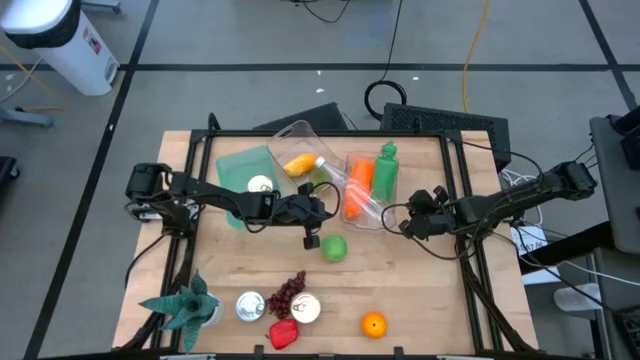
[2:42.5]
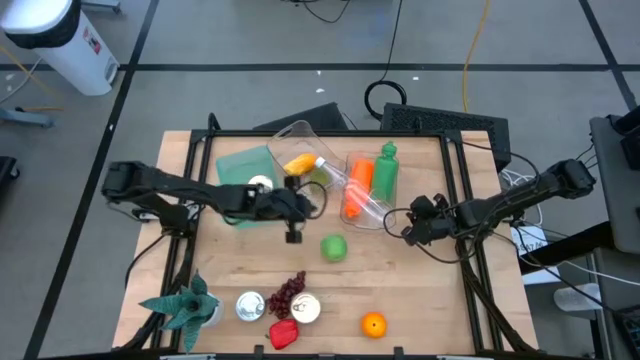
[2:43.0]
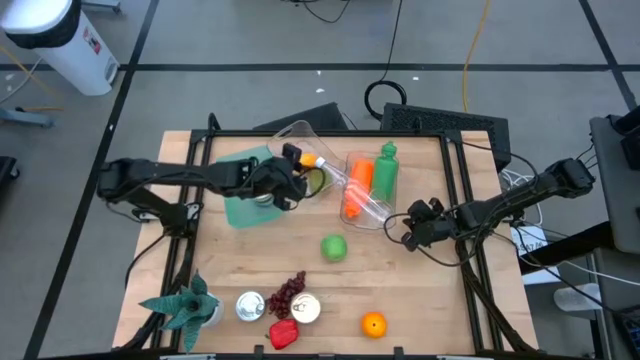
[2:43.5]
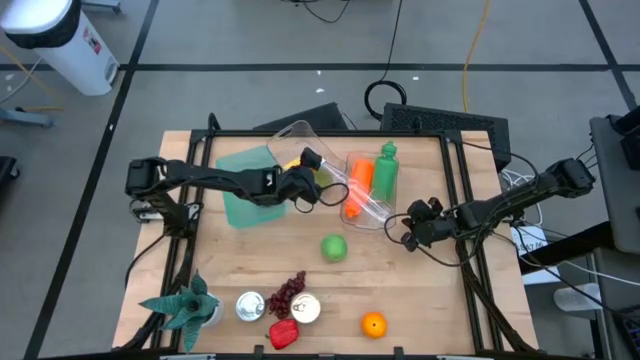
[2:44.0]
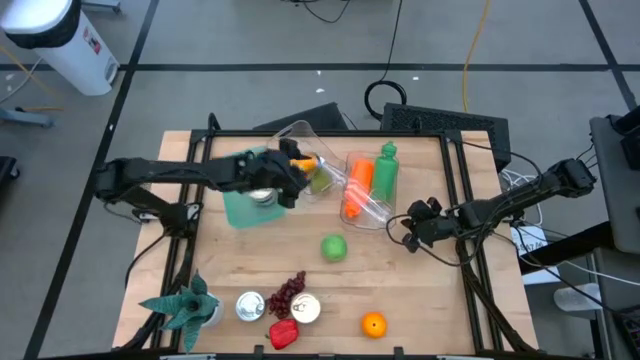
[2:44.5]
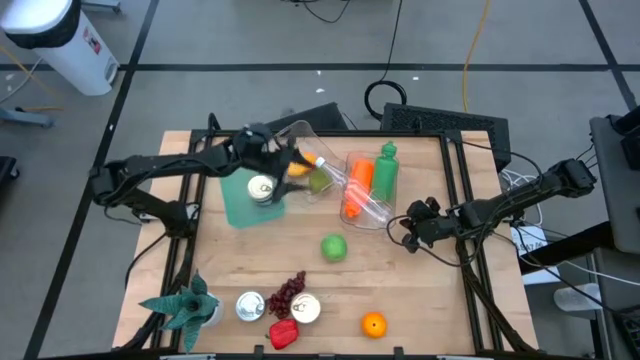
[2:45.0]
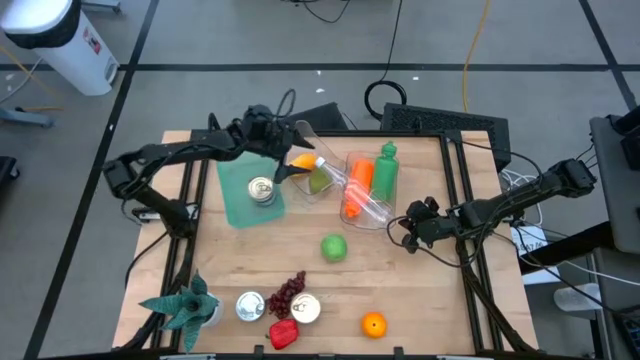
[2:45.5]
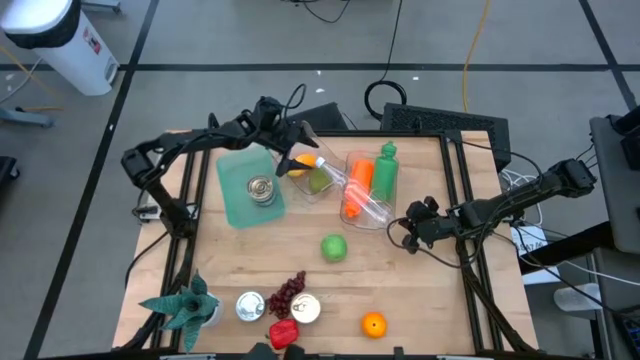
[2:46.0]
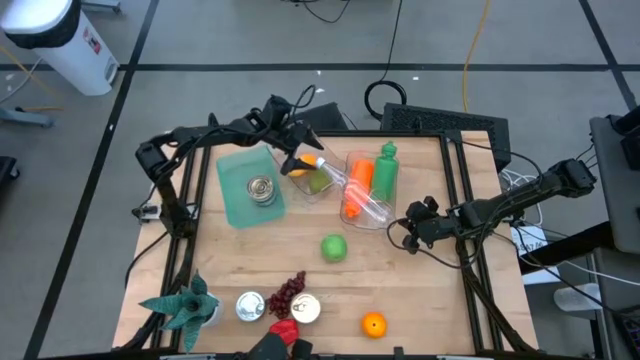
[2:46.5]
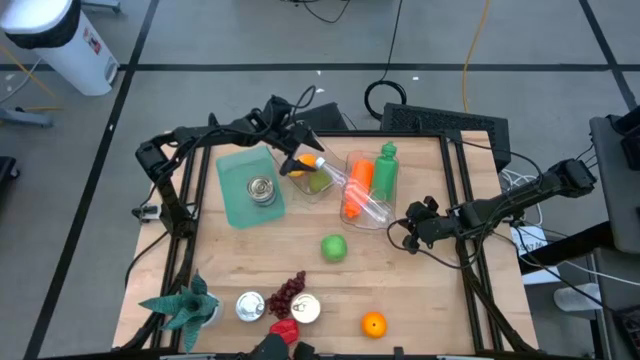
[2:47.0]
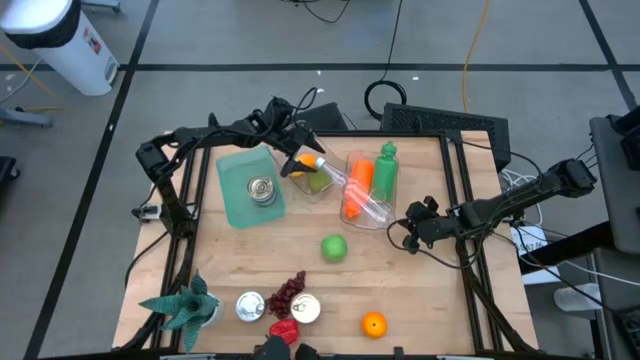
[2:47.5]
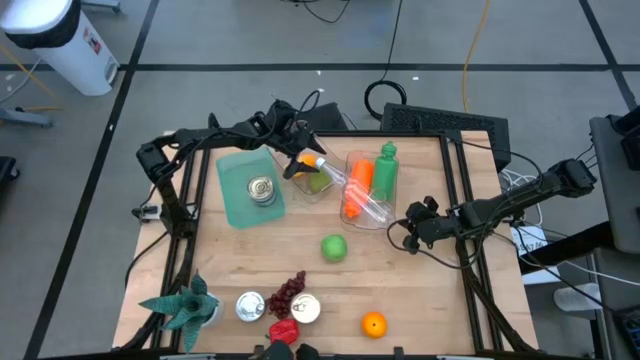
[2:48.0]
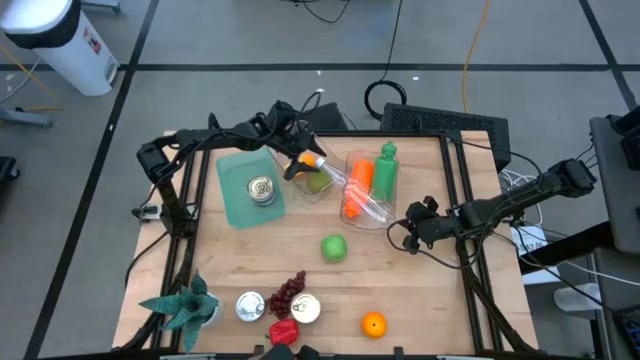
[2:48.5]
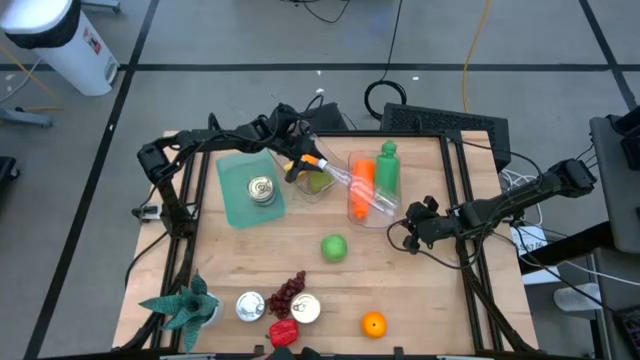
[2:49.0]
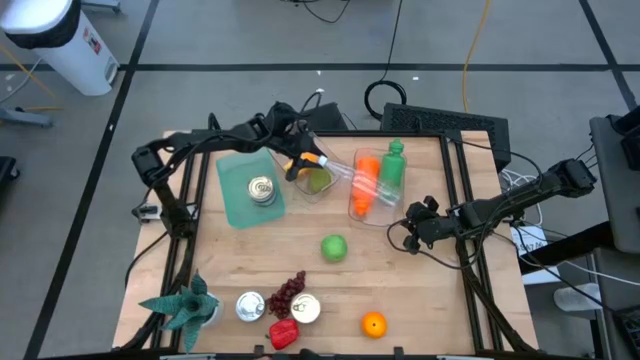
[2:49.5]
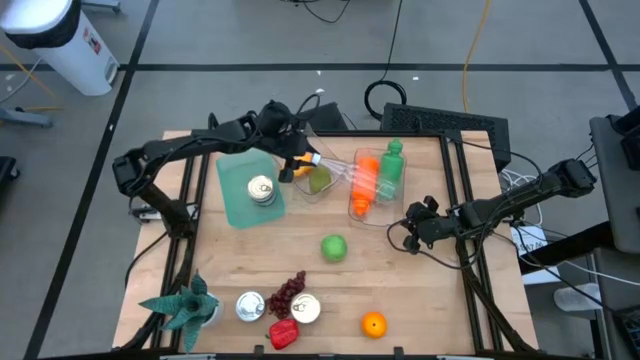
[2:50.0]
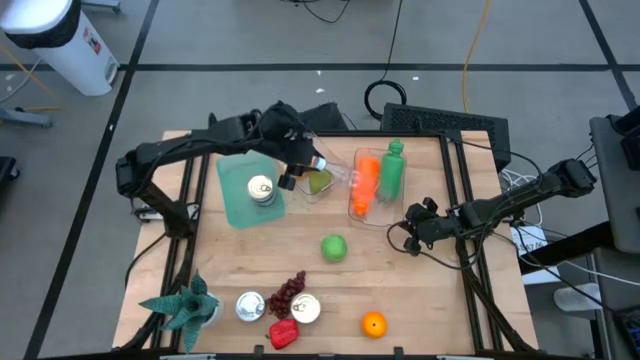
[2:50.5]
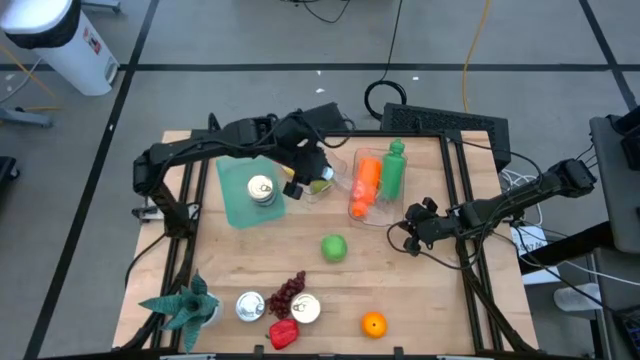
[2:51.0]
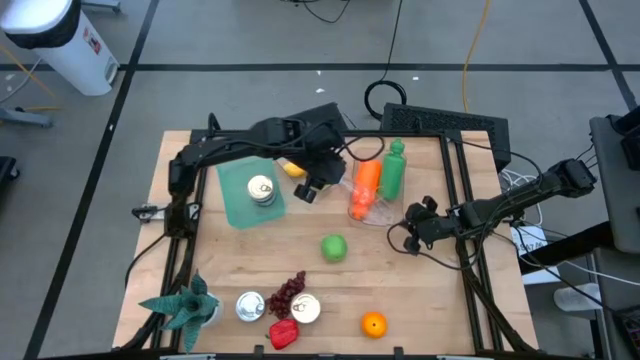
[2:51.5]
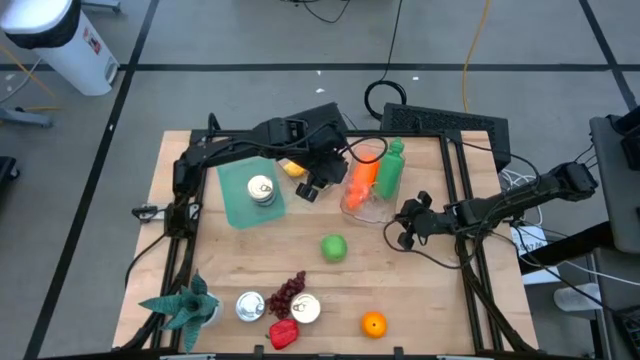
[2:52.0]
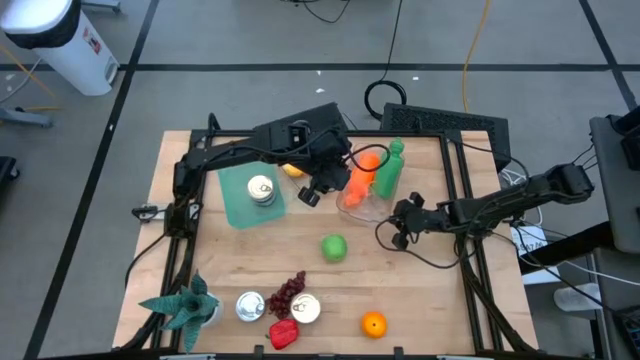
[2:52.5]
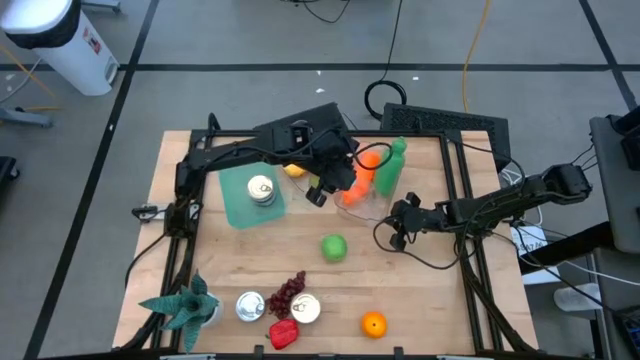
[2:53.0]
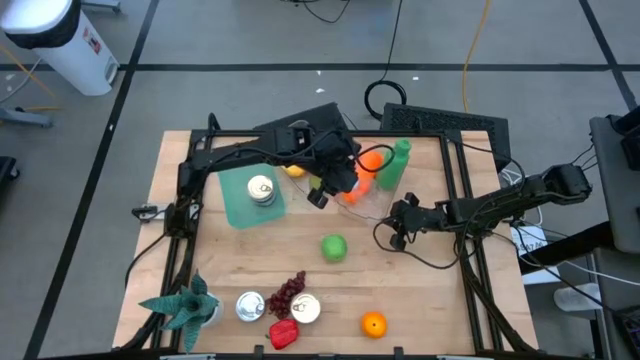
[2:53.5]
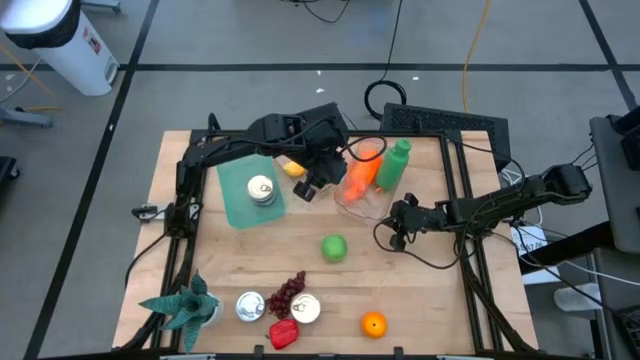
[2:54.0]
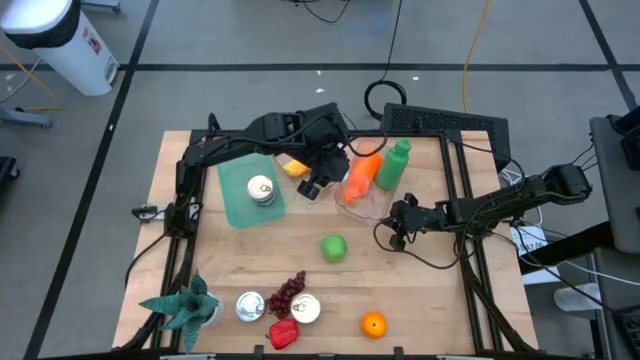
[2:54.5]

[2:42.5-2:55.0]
Task: Pick & Place Food Item
Put the transparent bottle into the right transparent bin upright

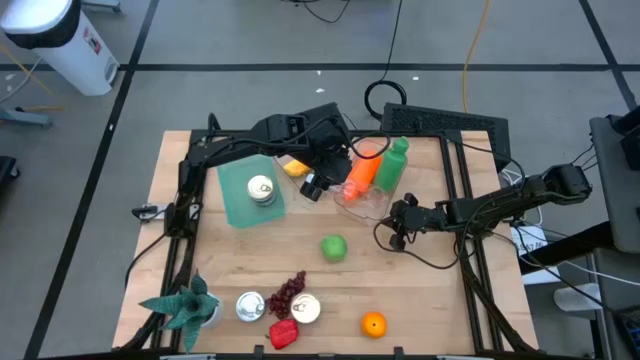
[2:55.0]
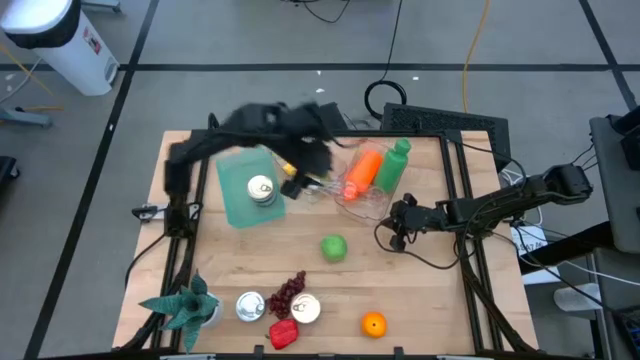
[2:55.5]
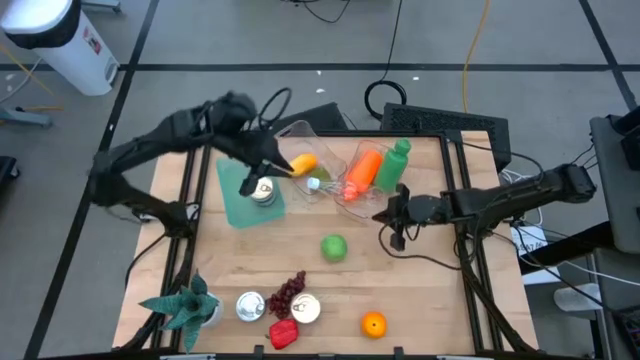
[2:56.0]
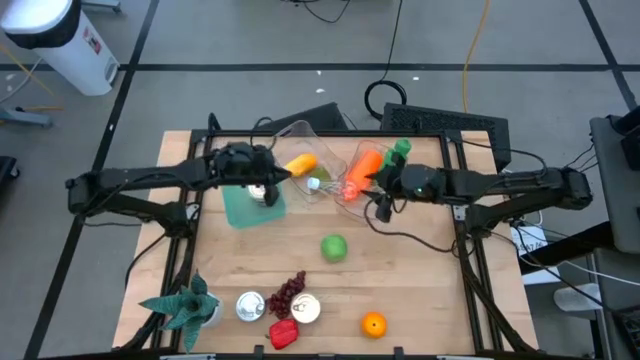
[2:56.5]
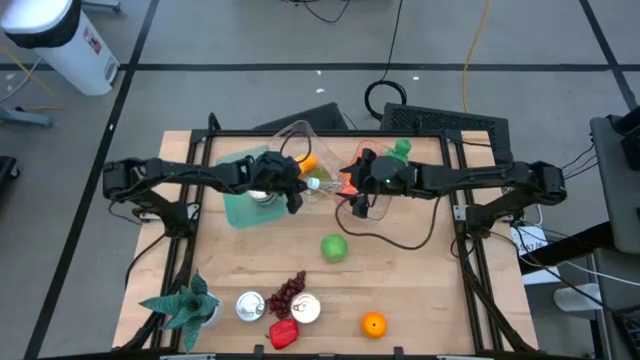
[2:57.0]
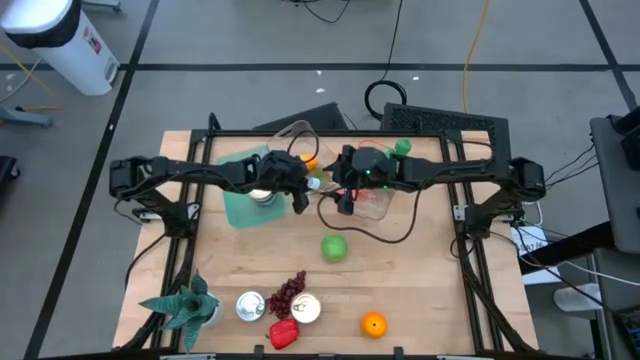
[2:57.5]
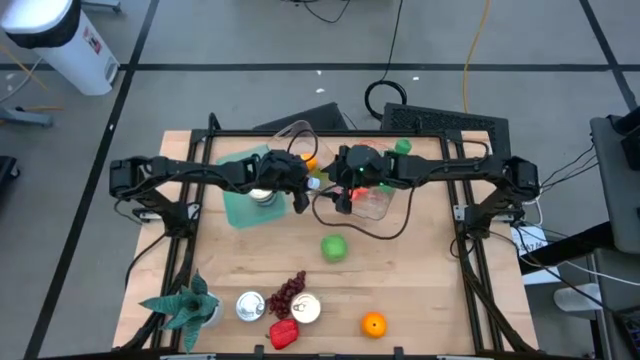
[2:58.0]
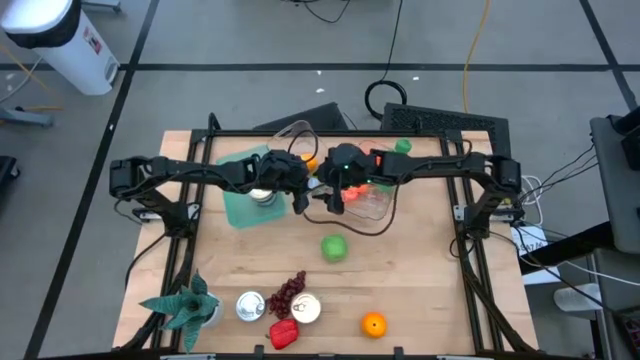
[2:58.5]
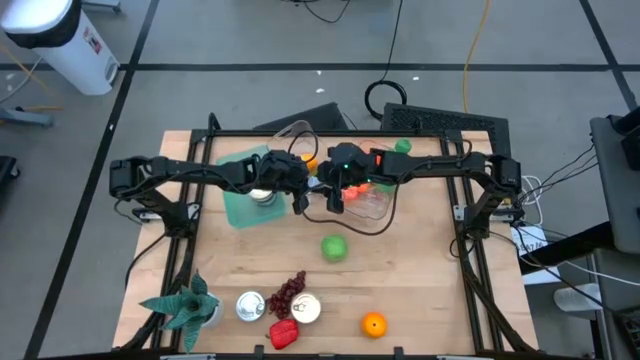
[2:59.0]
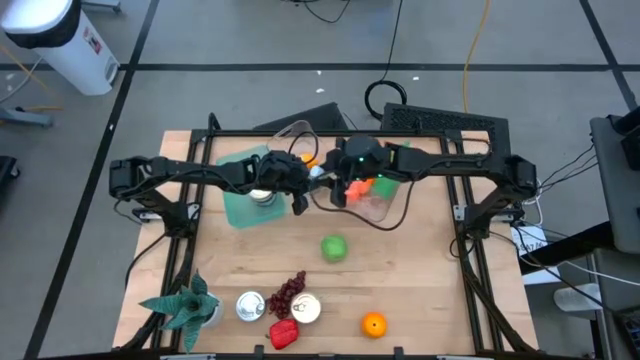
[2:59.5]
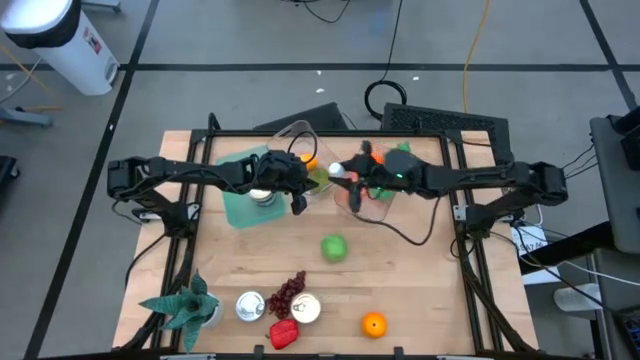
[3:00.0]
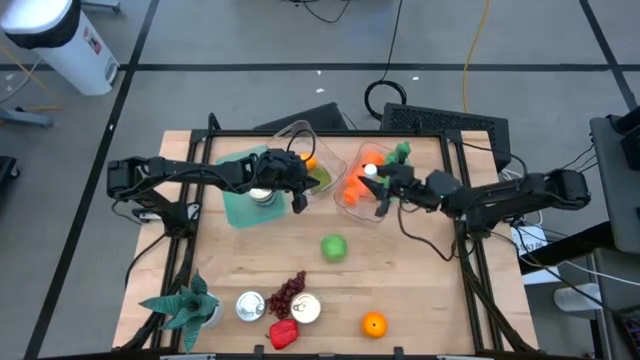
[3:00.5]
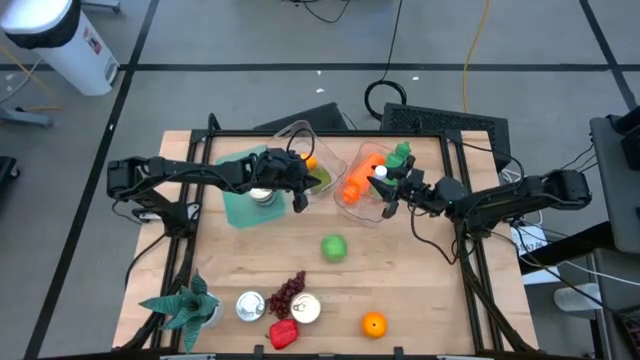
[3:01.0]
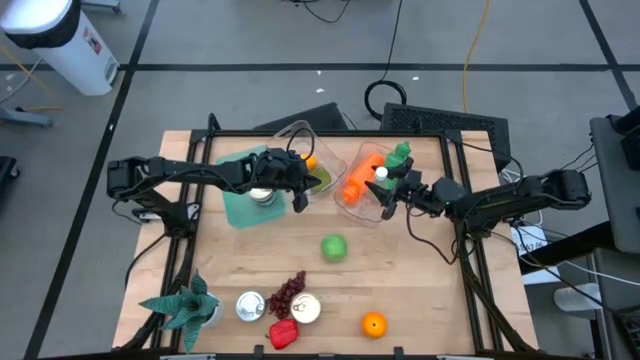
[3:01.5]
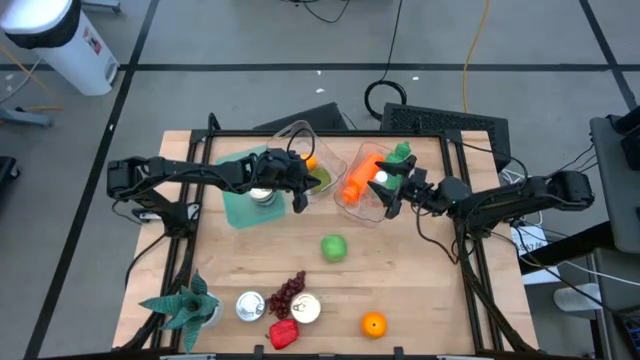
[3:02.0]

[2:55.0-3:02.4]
Put the transparent bottle into the right transparent bin upright
